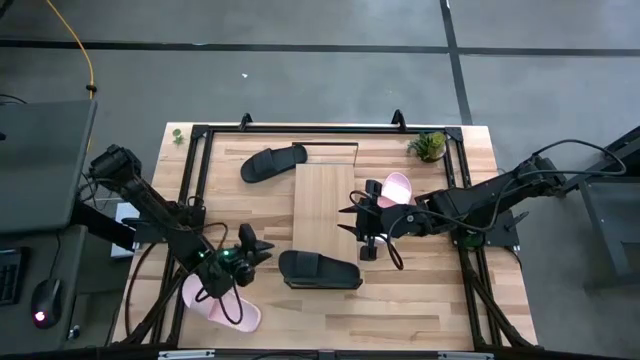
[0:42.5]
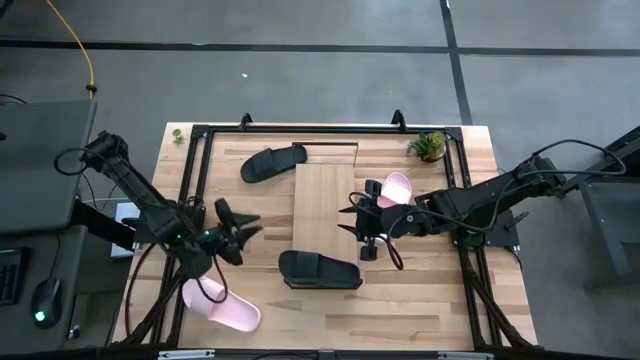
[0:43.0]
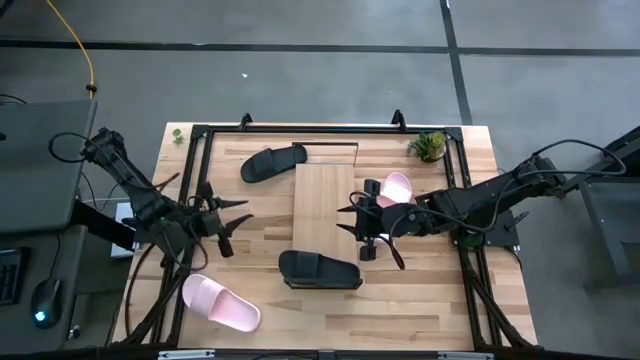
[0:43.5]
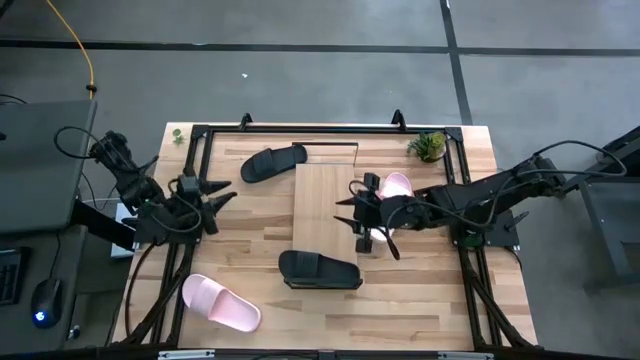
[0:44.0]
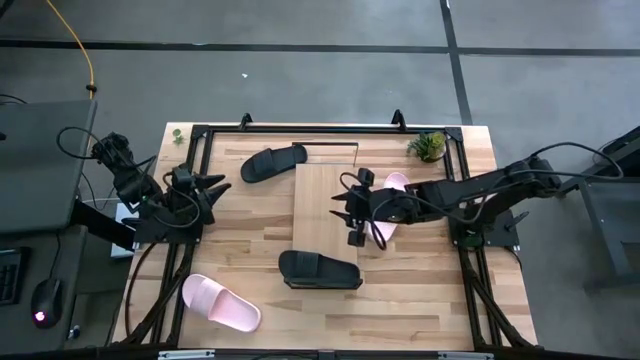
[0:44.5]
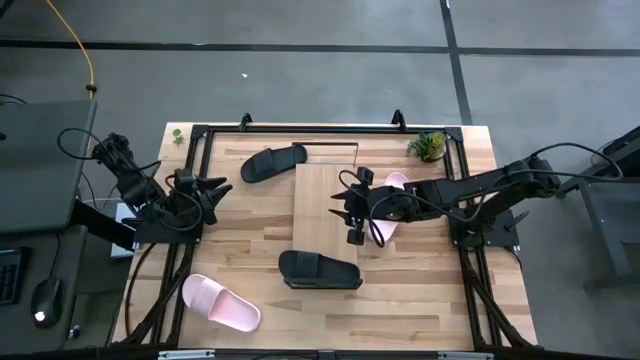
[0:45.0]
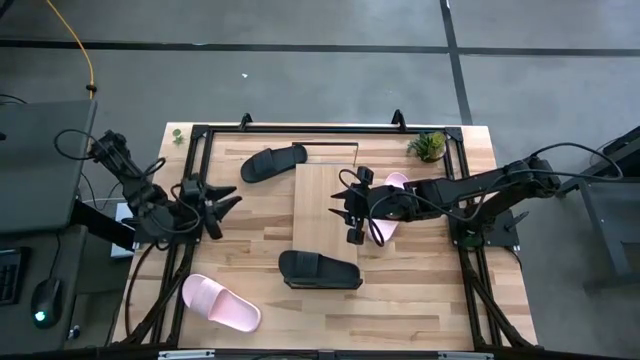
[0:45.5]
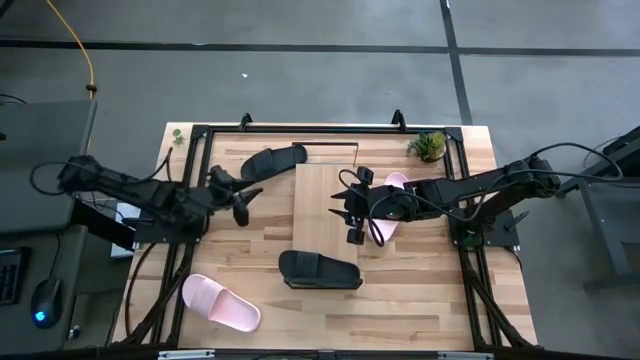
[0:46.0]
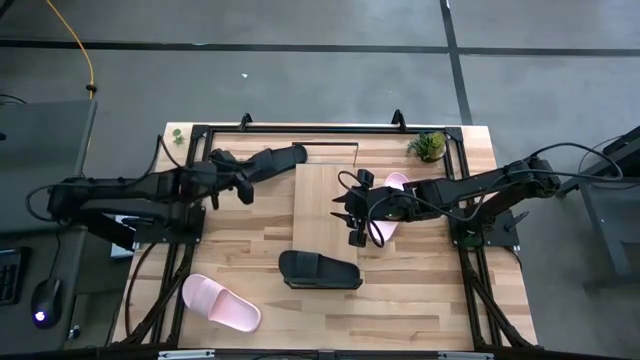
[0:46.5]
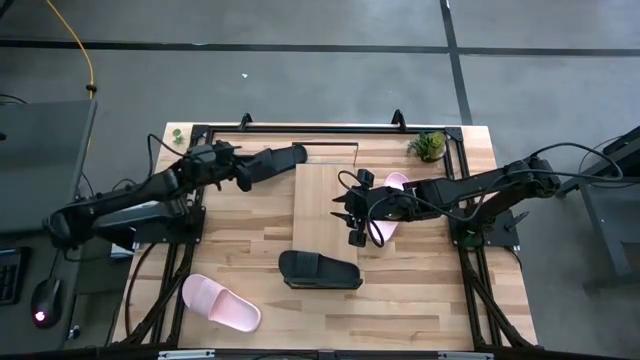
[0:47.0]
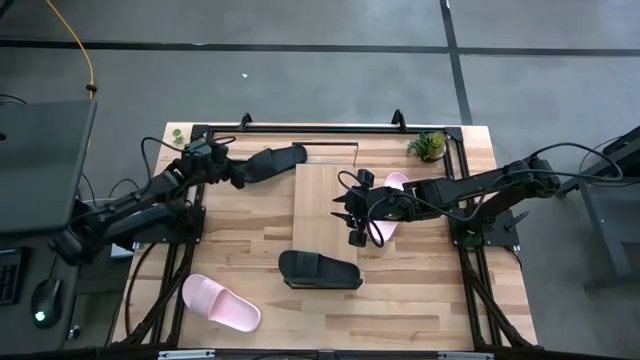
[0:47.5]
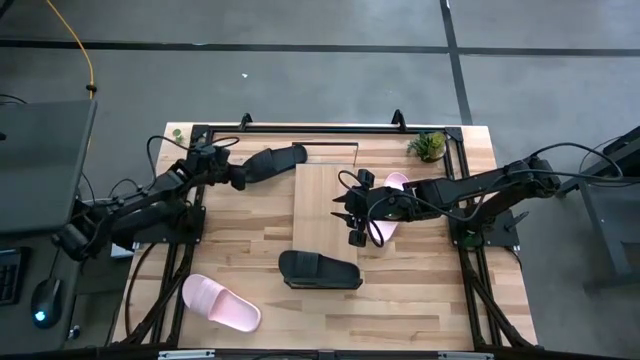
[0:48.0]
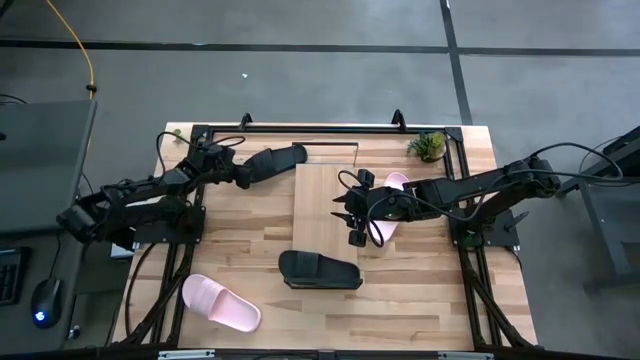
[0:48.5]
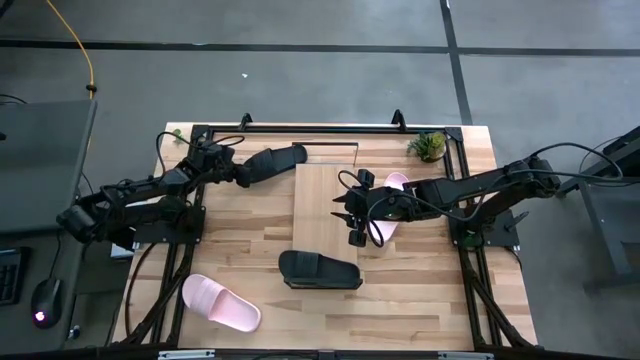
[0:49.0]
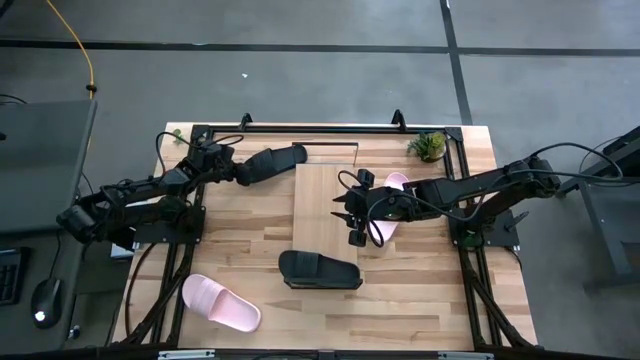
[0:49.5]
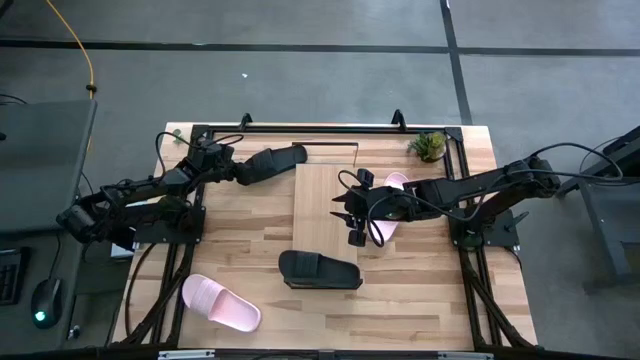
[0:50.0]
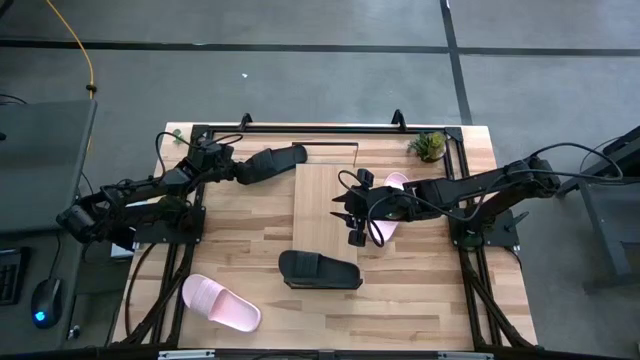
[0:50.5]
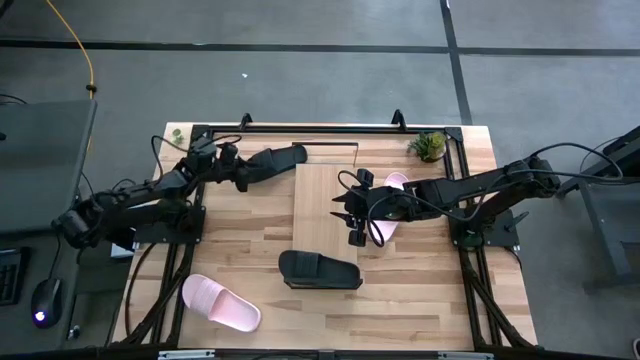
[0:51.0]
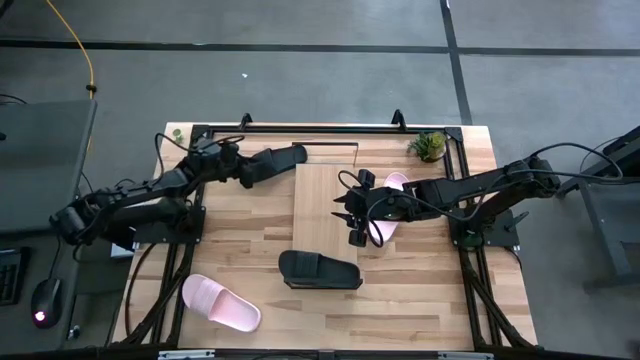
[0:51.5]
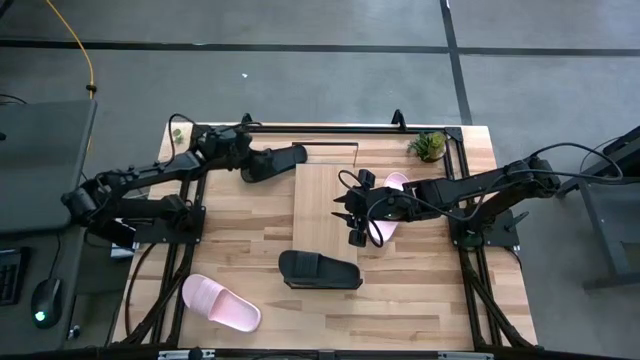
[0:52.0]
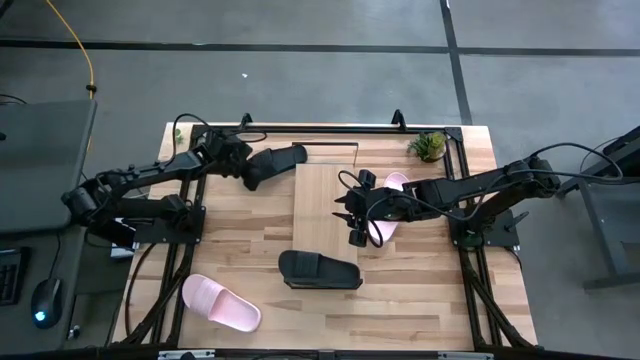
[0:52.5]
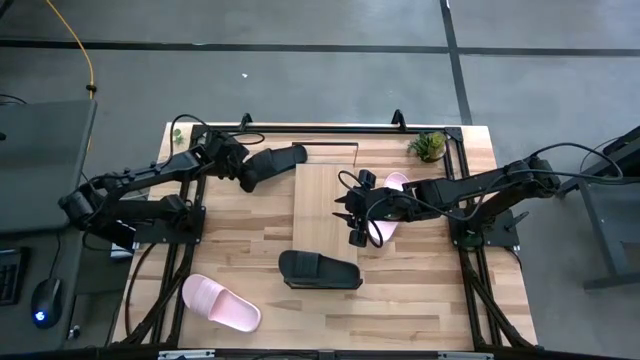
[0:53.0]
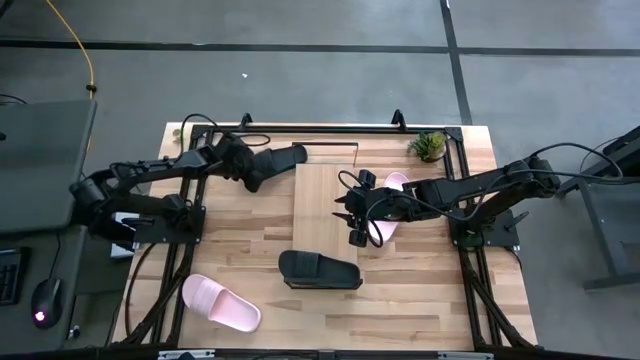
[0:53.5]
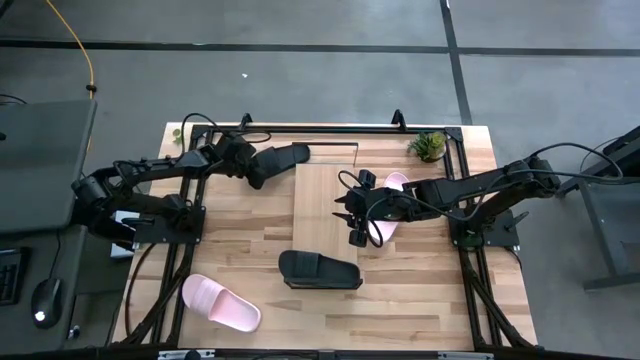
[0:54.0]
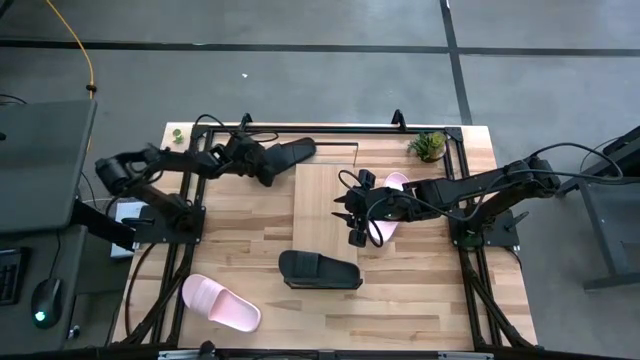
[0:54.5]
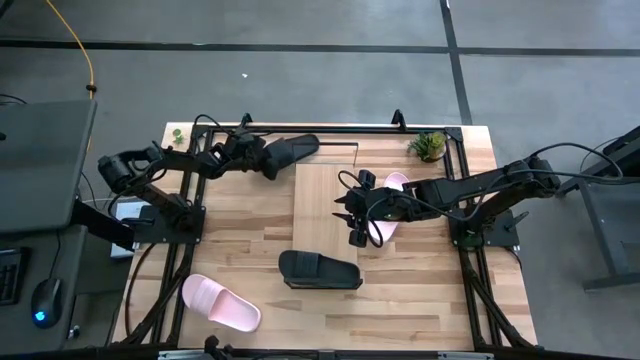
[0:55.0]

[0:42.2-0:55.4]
Task: Pick and place slides into the shelf
Put the black slipper on the shelf

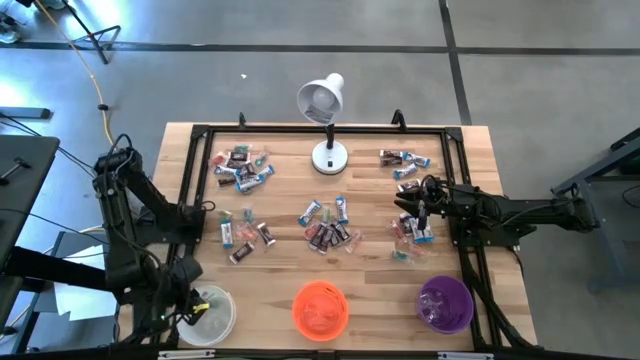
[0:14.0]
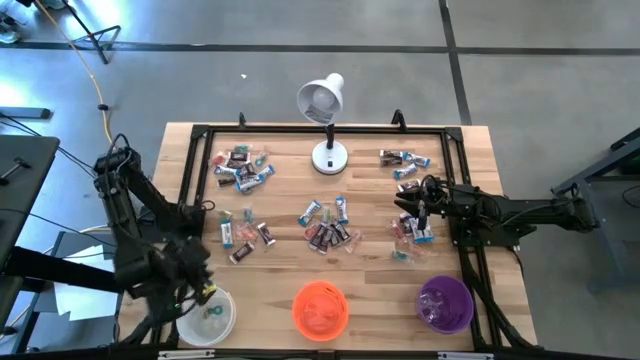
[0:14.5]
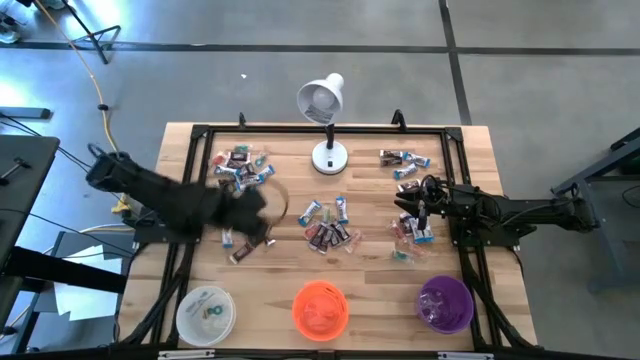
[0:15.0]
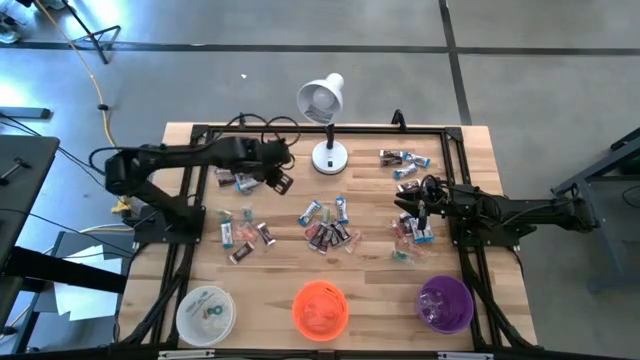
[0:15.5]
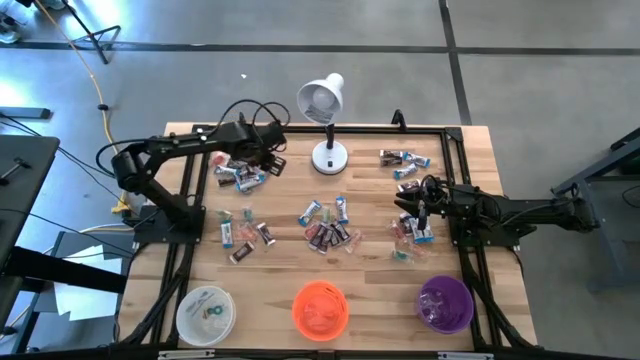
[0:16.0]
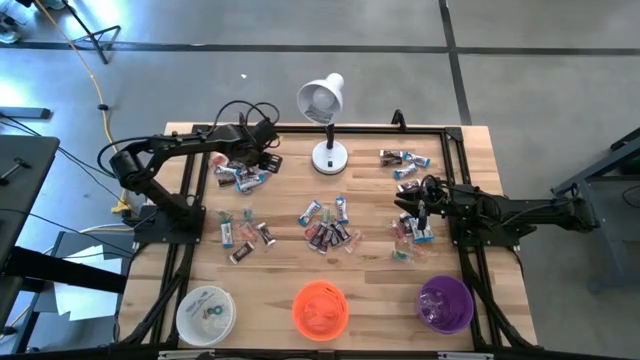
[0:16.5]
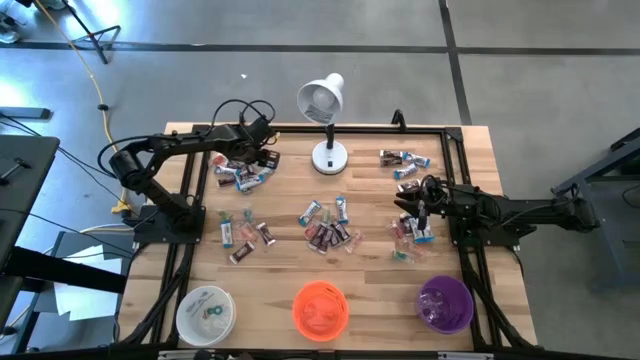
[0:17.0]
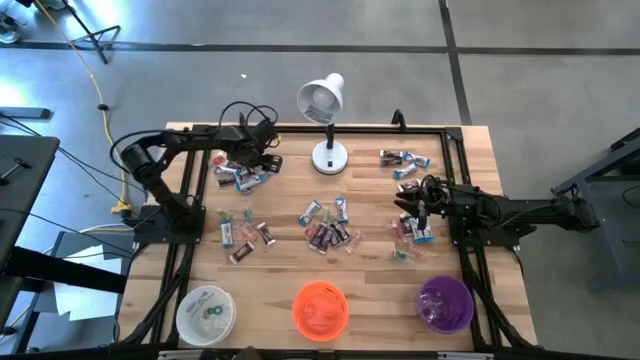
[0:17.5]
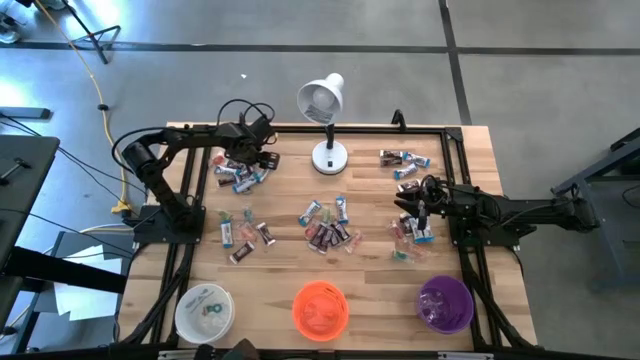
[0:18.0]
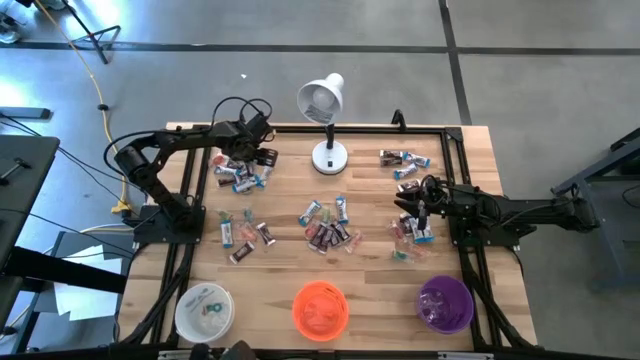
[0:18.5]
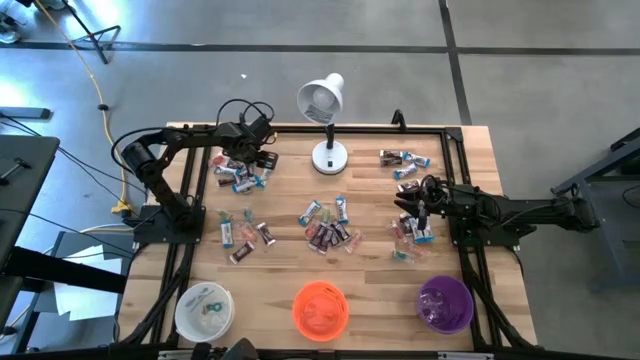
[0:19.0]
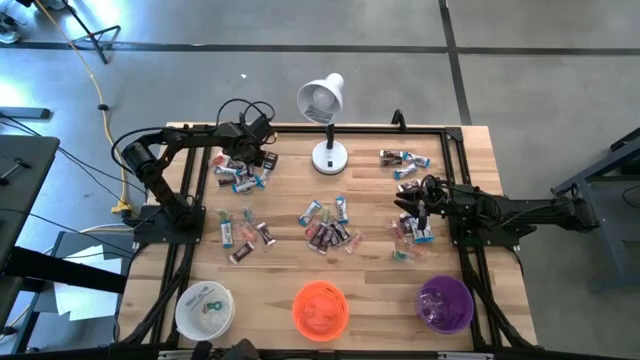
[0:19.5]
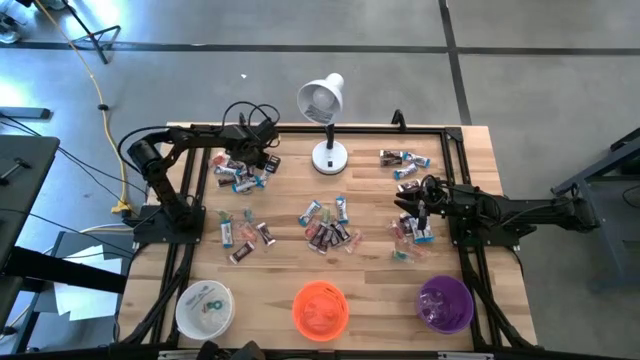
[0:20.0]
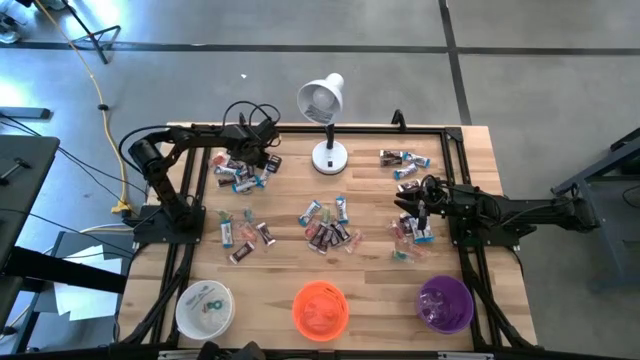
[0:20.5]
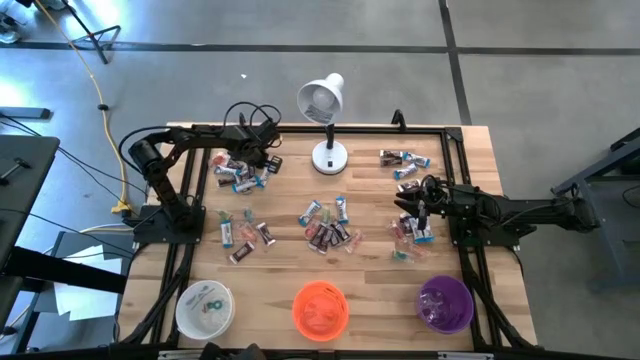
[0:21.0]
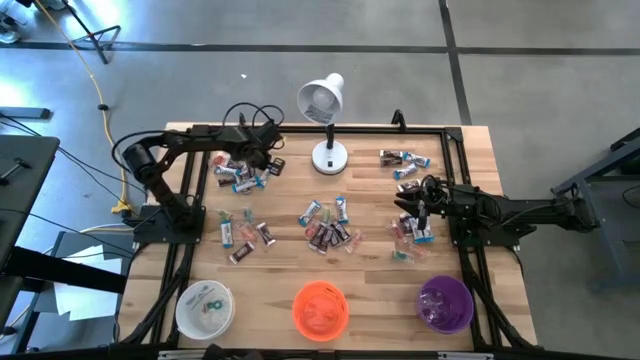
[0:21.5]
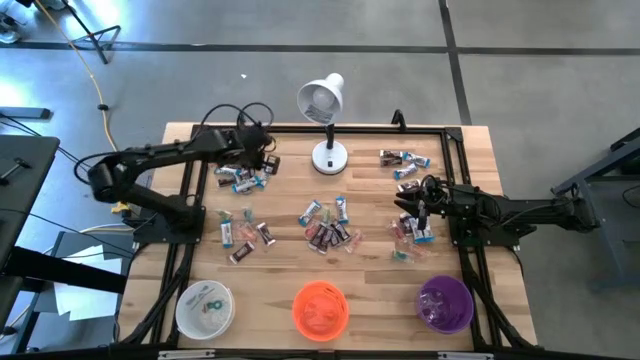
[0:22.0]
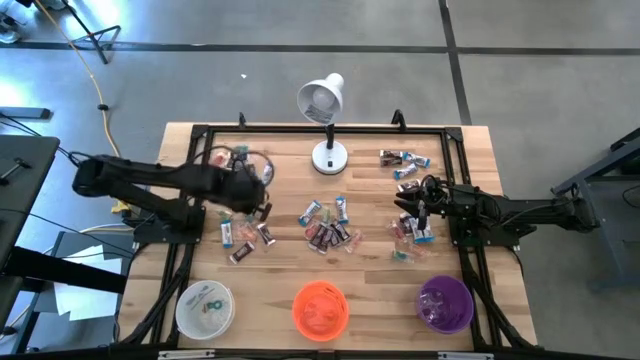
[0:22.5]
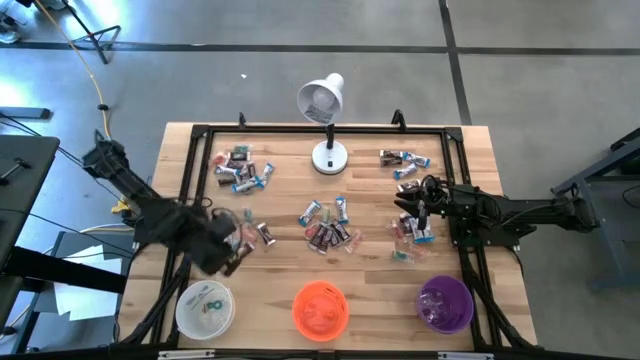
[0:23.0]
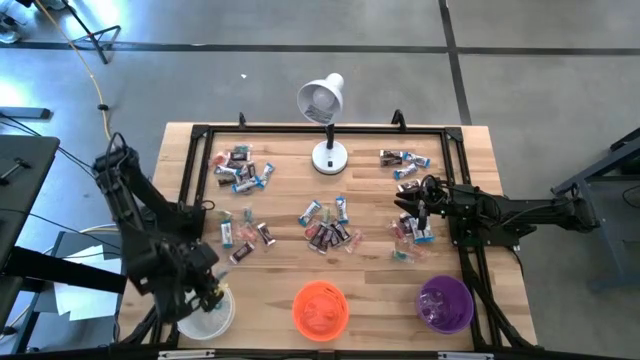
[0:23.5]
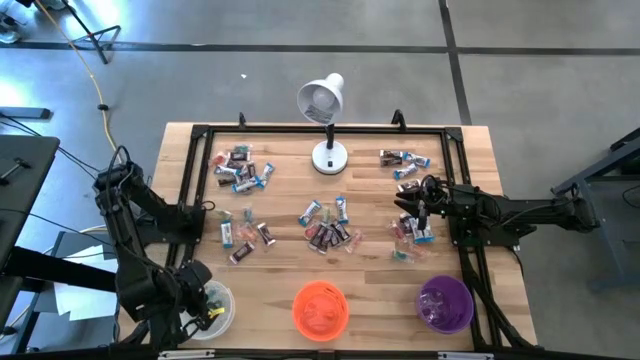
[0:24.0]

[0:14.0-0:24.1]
Task: Organize candy in baskets
Put the blue gummy into the white bucket
